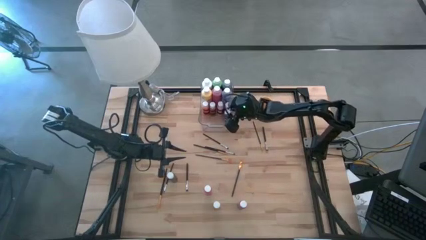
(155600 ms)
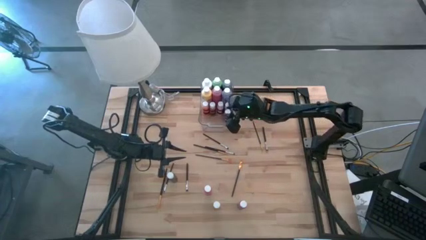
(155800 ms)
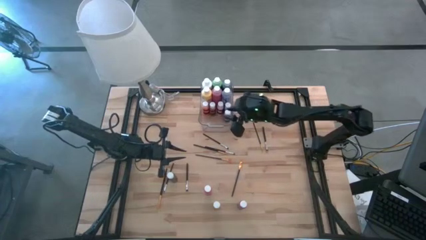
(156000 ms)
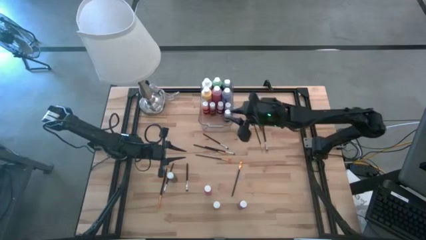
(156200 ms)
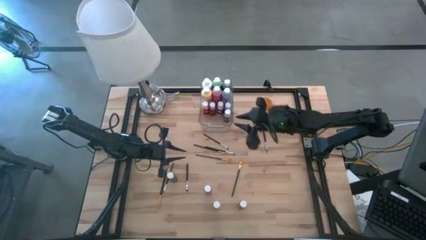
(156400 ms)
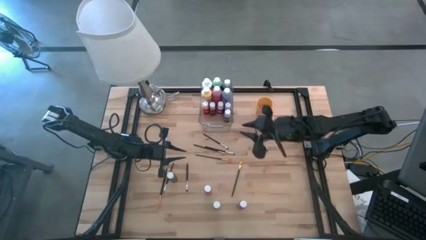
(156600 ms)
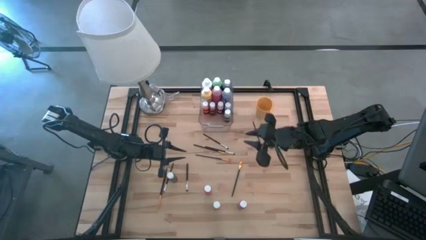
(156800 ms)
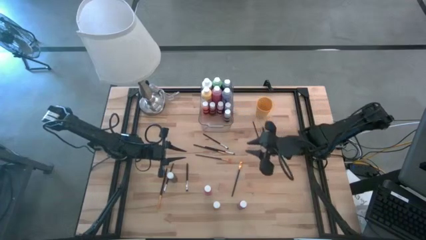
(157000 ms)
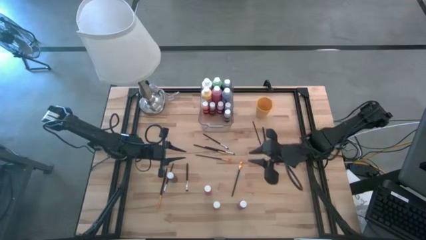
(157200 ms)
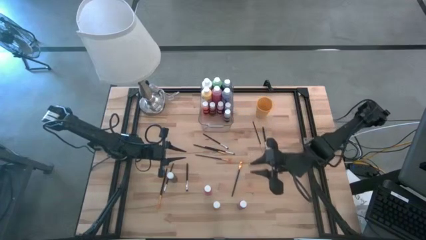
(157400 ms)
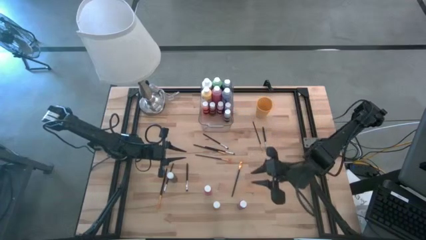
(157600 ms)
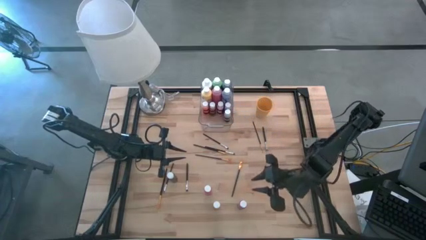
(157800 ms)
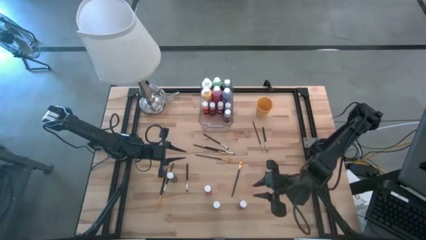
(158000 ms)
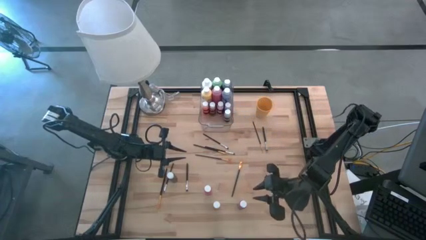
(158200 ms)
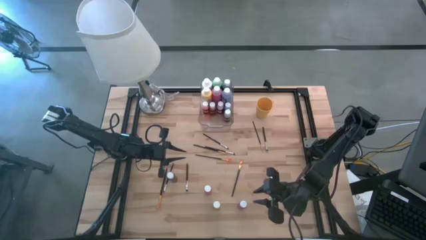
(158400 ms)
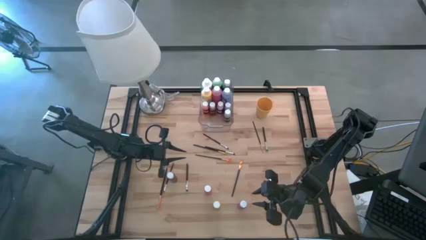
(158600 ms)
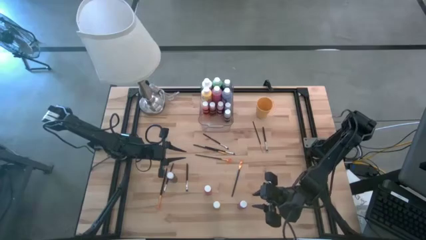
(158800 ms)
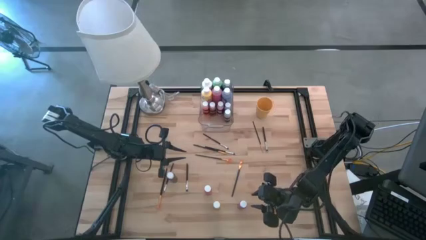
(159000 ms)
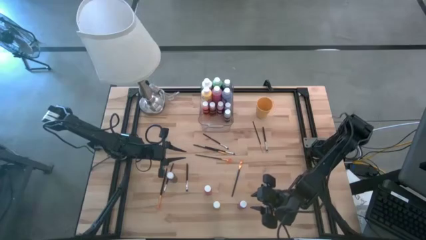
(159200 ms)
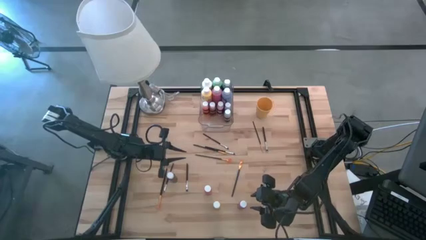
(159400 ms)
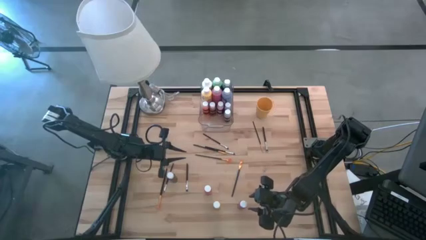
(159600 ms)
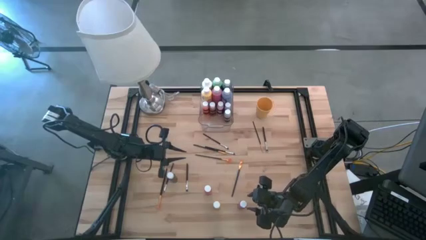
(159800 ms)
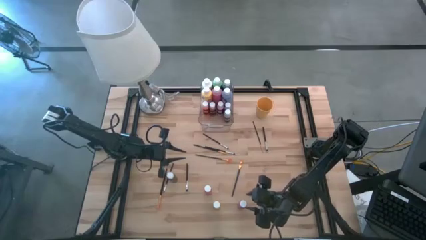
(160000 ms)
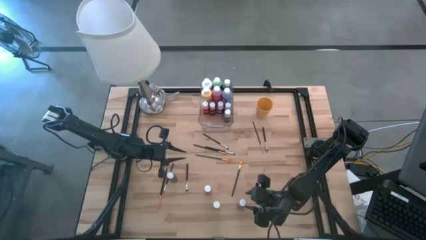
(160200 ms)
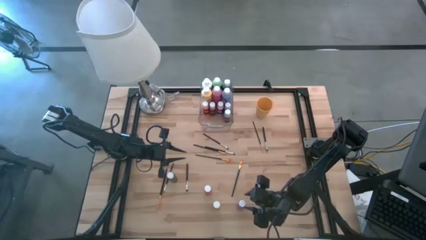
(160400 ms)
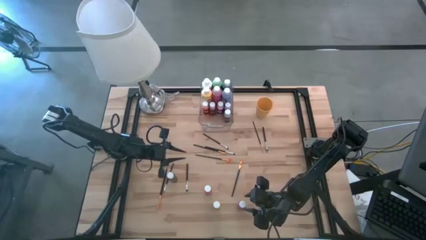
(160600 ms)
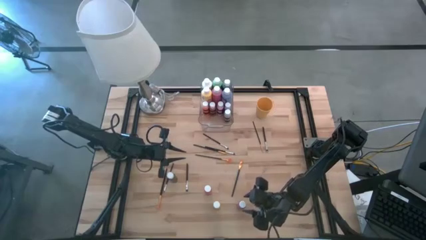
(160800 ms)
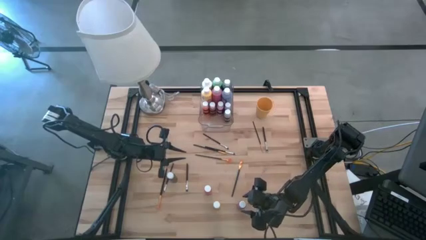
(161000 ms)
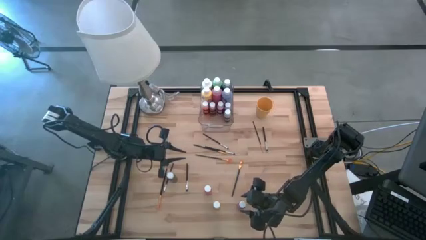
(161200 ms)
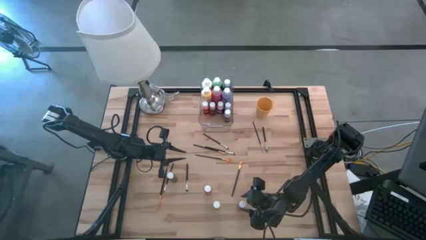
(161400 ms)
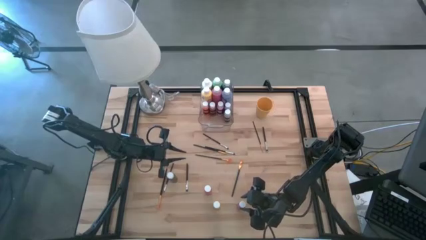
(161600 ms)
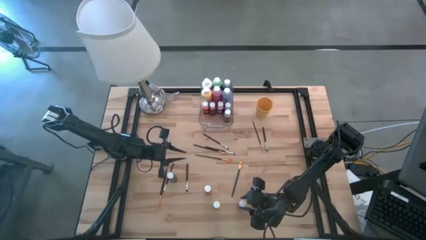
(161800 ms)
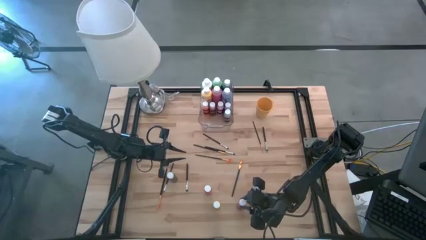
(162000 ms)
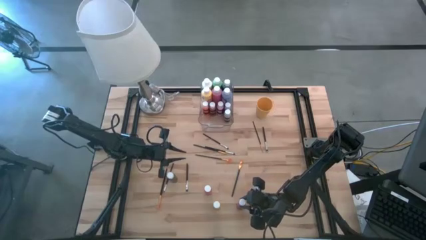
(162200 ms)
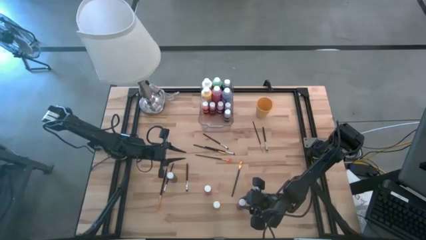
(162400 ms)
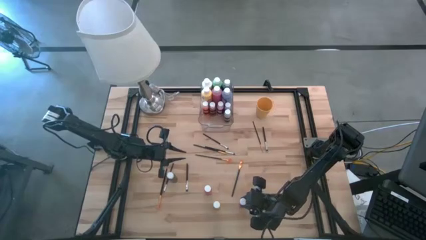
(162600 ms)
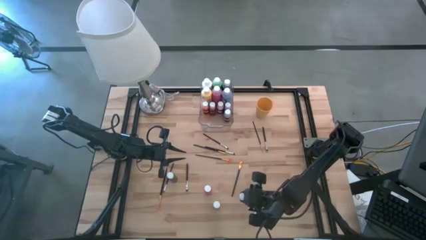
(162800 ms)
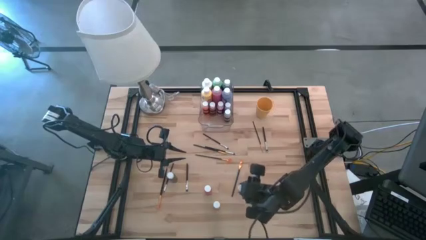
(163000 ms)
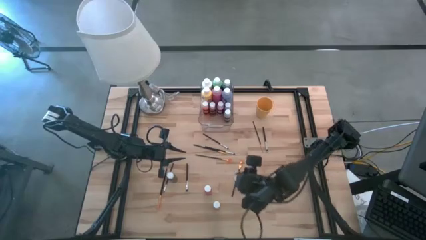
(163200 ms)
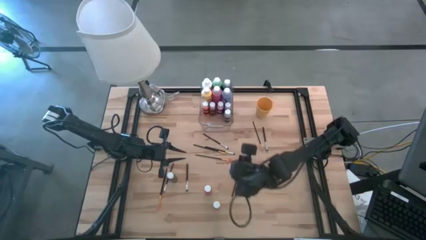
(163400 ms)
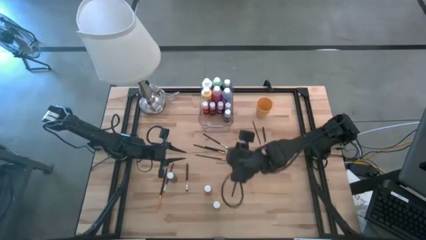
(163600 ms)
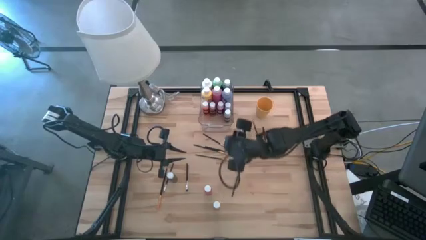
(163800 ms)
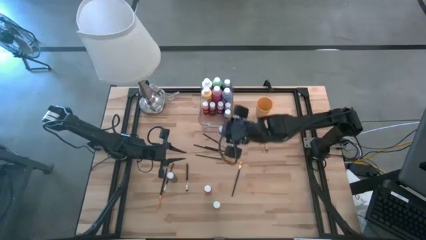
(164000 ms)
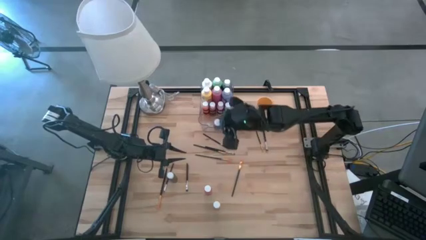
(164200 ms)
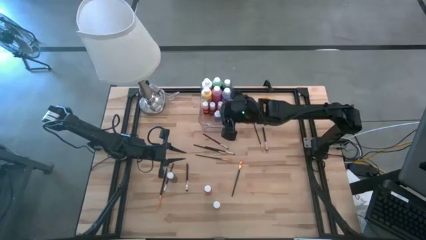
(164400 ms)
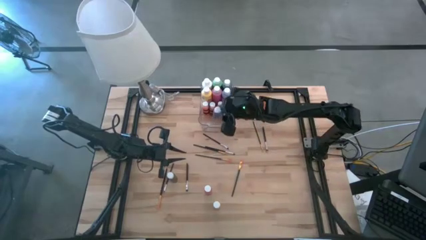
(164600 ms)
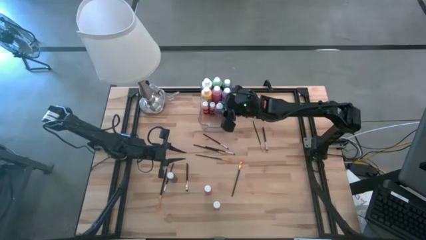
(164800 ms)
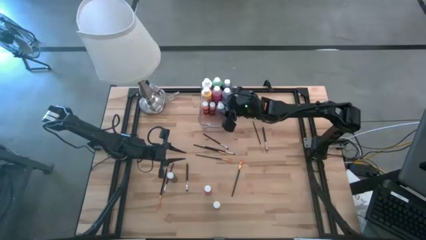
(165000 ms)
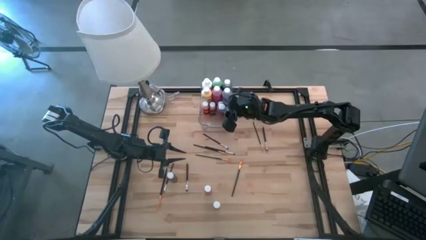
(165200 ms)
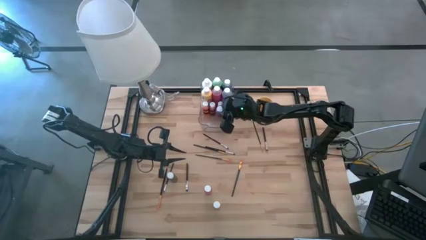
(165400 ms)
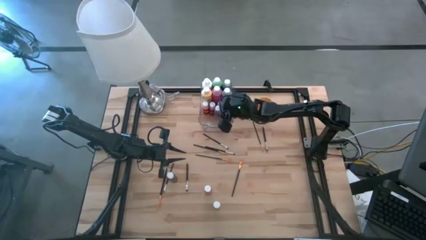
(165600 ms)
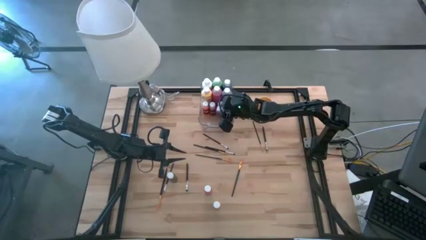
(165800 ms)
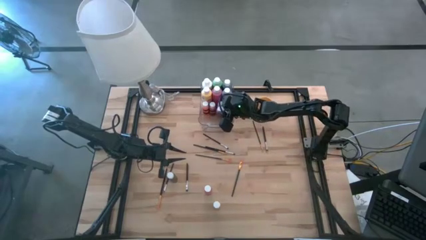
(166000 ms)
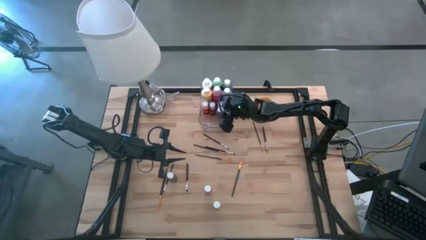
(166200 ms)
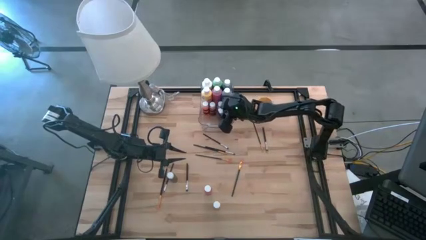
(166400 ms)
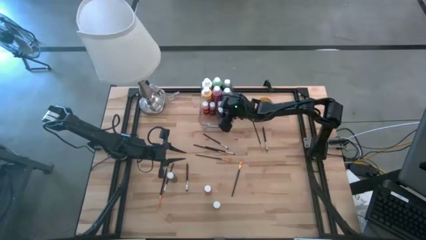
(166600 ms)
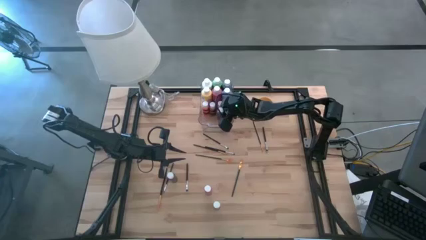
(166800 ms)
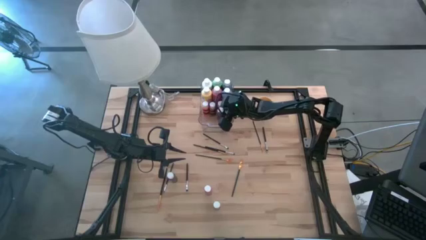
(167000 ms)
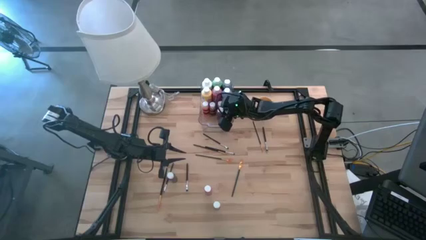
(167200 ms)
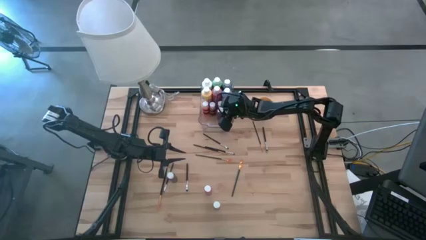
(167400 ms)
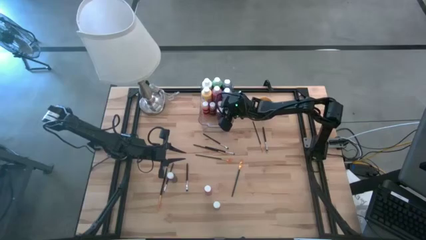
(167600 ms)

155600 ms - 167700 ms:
Task: Pick & Place Paint Supplies
Put the small pink paint bottle into the bin

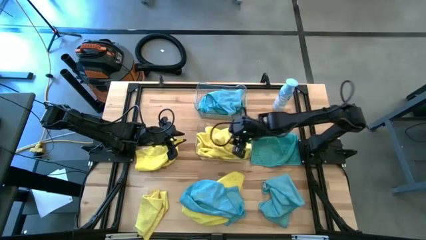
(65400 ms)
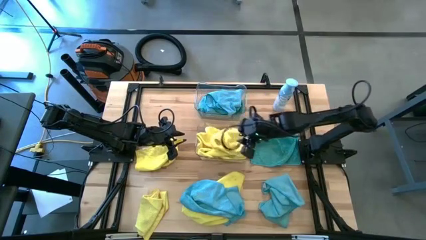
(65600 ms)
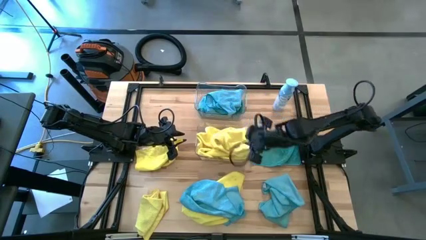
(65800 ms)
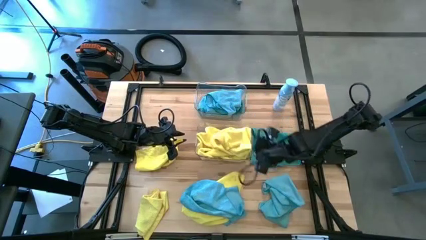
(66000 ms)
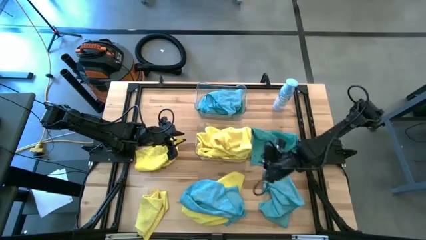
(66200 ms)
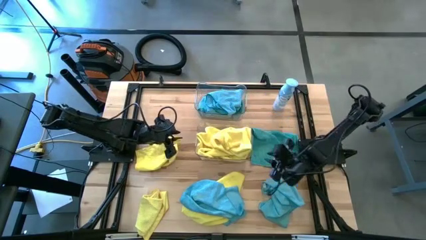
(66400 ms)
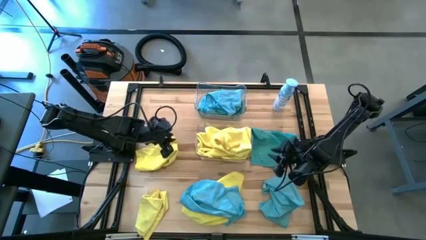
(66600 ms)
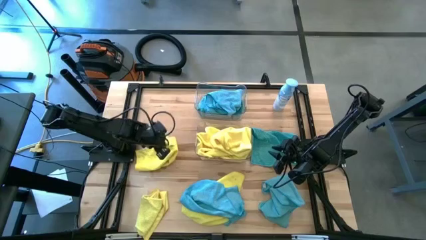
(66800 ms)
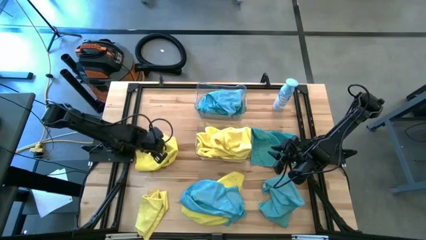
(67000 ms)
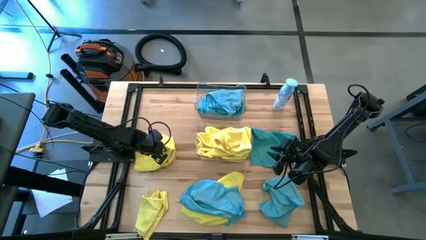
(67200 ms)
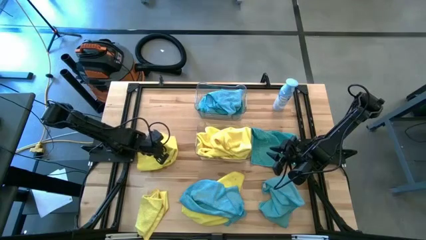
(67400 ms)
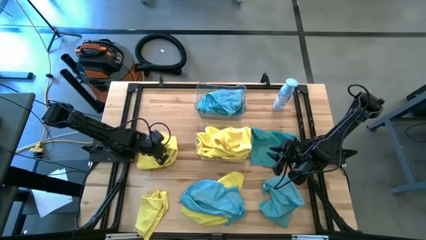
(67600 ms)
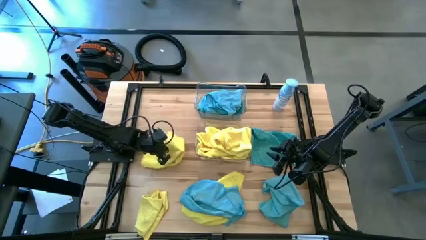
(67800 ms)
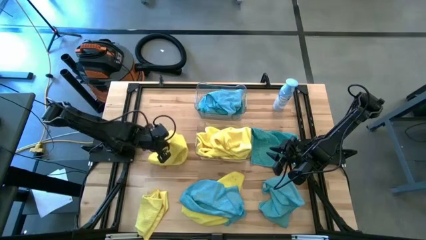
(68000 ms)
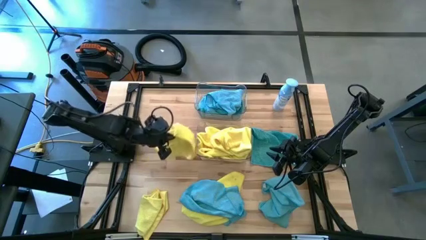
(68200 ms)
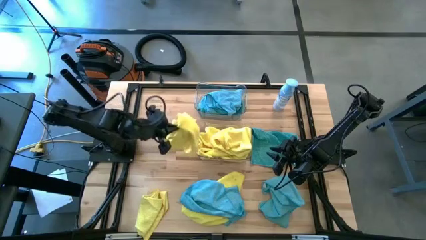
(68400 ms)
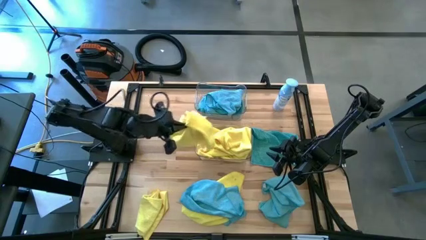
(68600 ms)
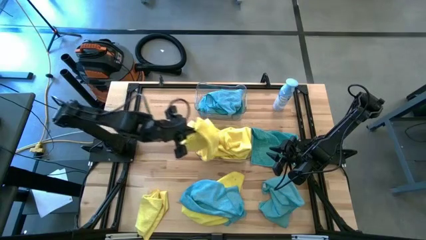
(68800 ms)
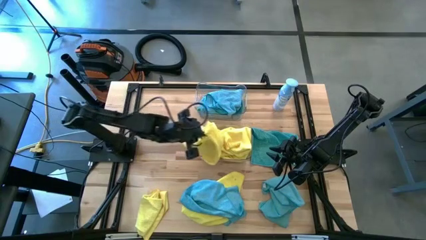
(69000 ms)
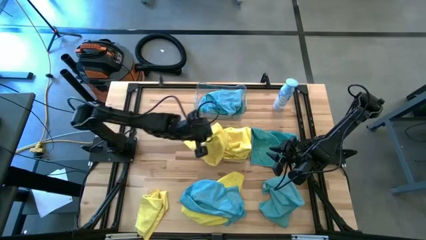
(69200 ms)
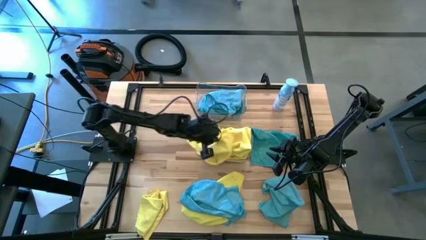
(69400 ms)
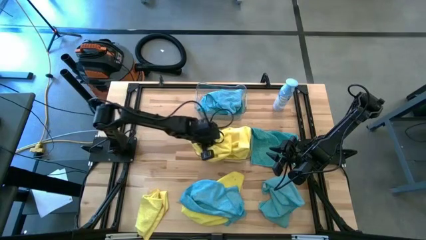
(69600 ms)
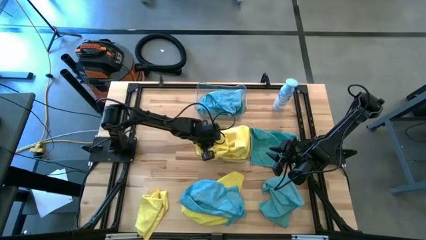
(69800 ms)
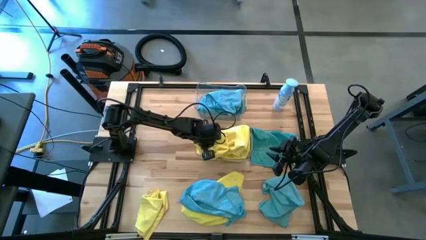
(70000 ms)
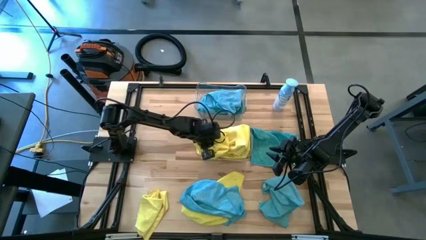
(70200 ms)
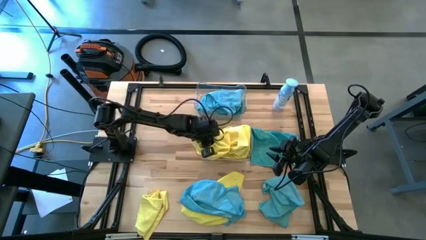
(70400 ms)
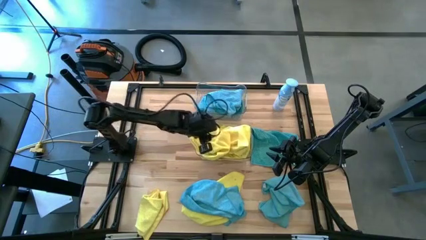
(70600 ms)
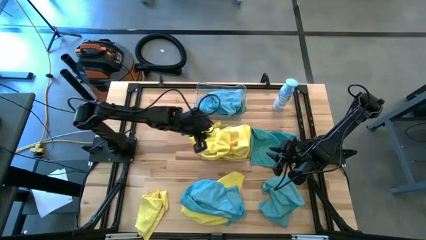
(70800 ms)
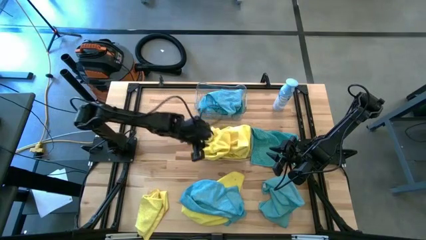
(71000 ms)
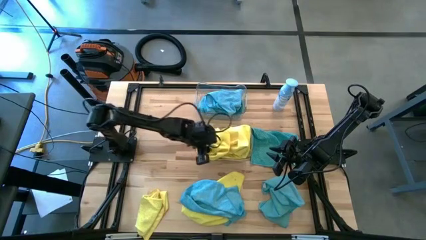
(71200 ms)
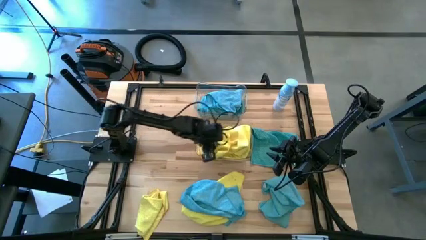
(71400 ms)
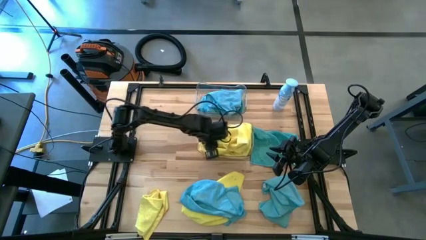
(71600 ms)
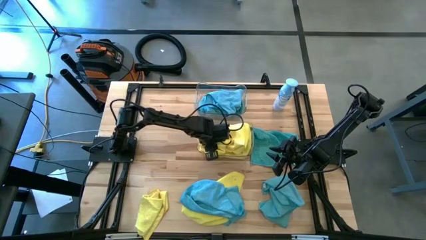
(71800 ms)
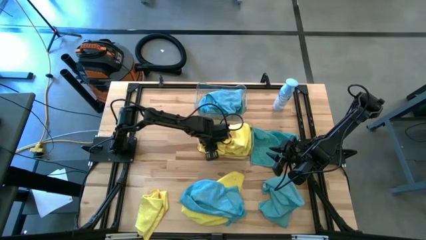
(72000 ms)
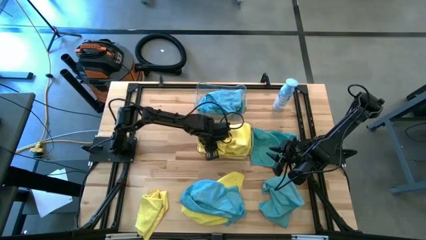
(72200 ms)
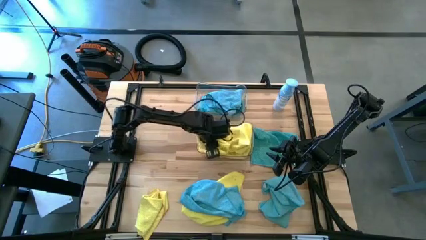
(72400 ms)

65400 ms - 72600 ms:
Task: Sort microfiber towel by color & place in baskets
Put the yellow towel into the bottom transparent bin
